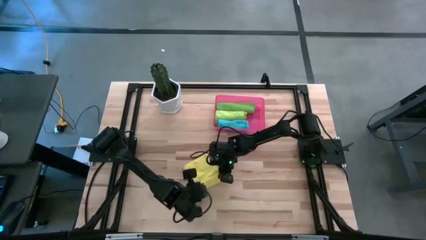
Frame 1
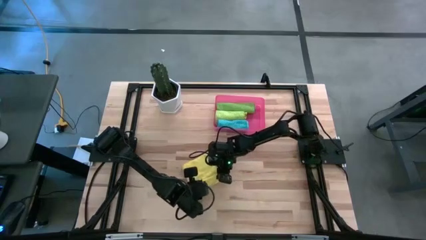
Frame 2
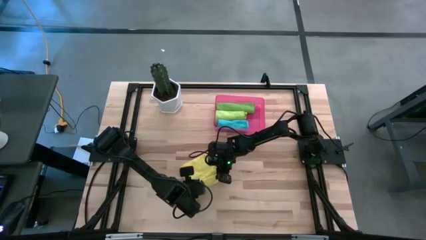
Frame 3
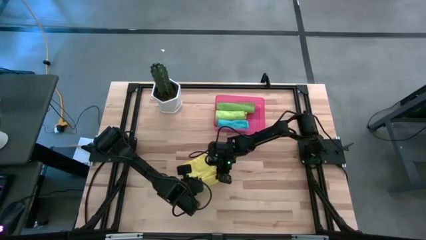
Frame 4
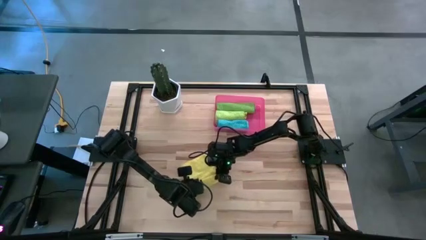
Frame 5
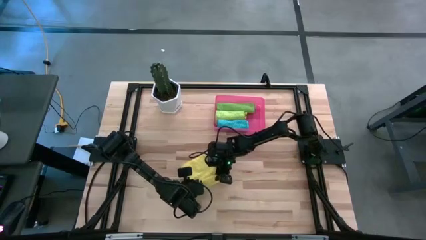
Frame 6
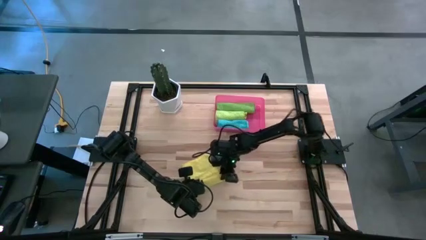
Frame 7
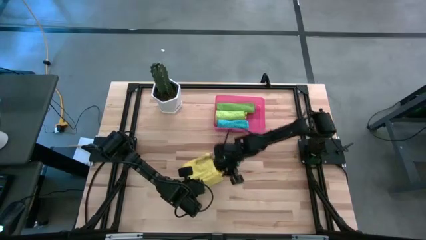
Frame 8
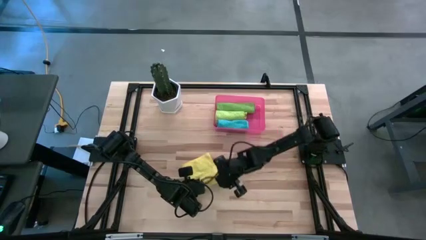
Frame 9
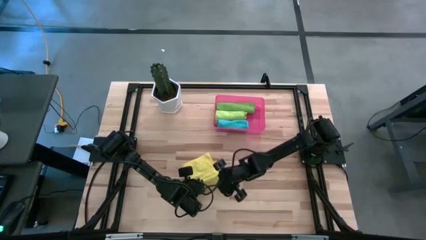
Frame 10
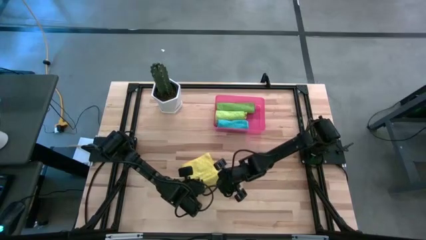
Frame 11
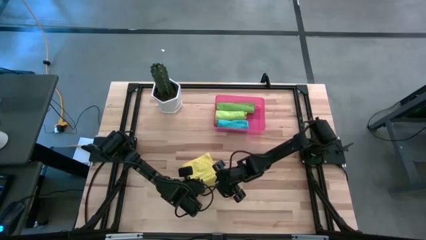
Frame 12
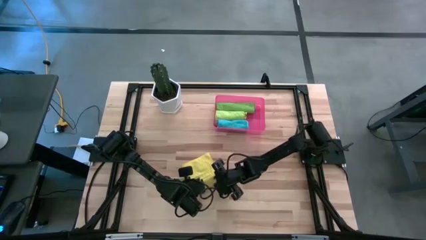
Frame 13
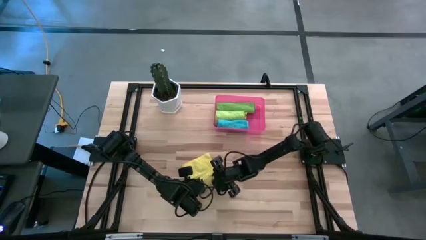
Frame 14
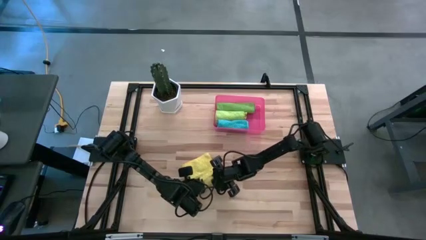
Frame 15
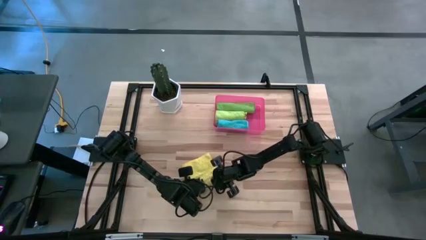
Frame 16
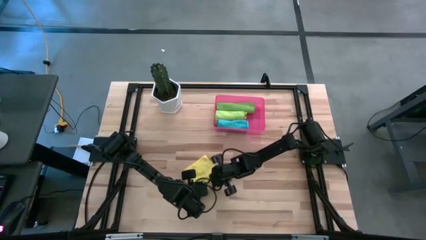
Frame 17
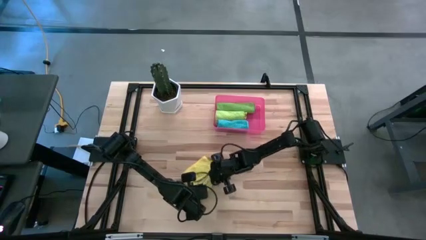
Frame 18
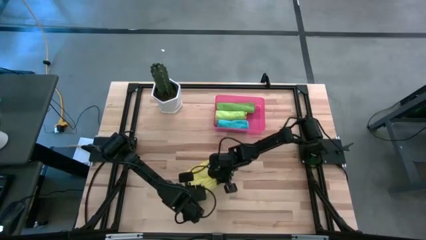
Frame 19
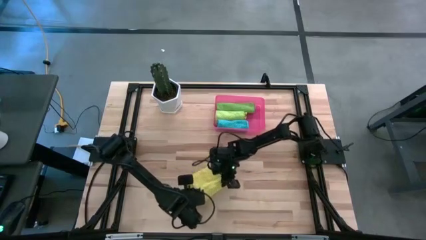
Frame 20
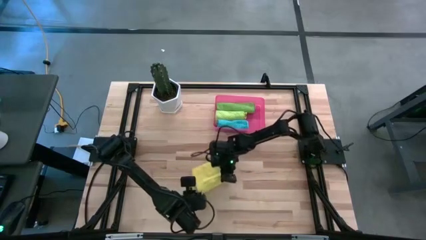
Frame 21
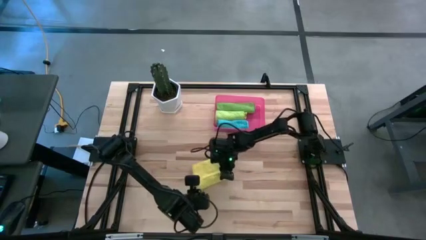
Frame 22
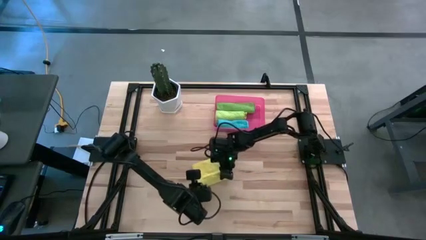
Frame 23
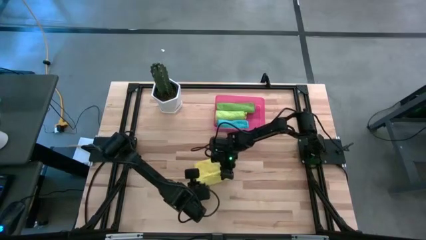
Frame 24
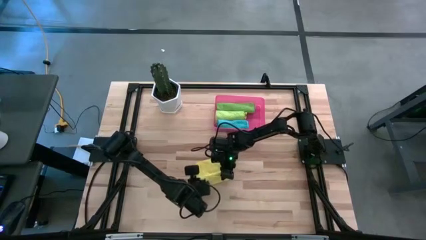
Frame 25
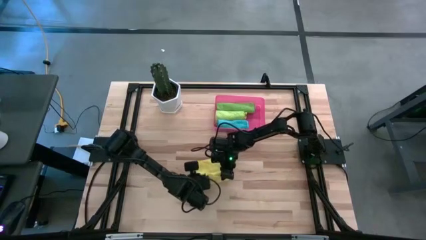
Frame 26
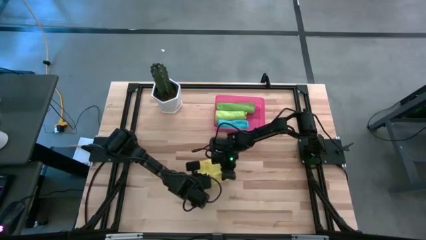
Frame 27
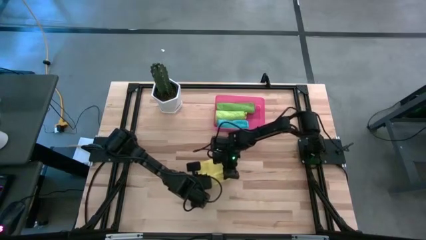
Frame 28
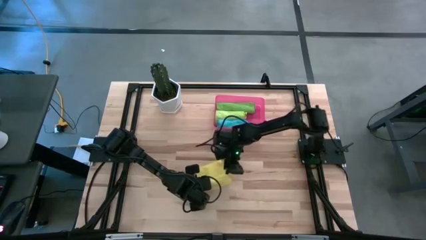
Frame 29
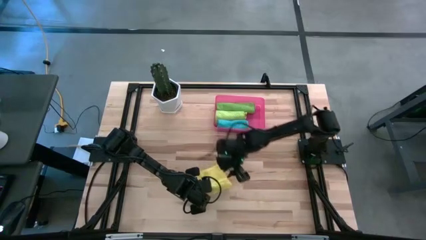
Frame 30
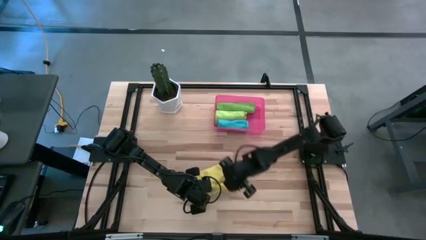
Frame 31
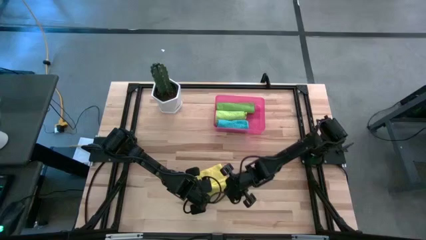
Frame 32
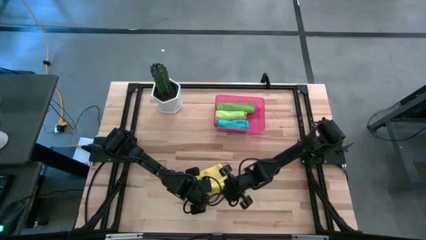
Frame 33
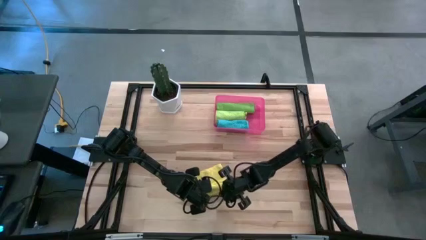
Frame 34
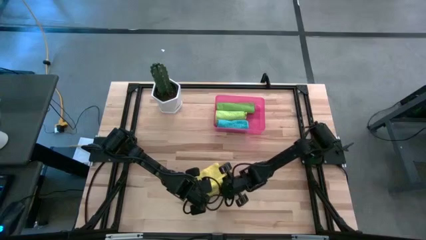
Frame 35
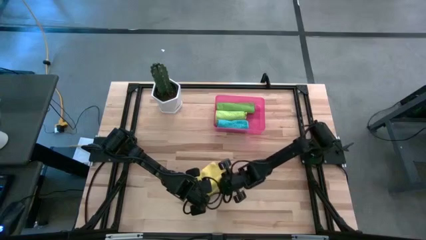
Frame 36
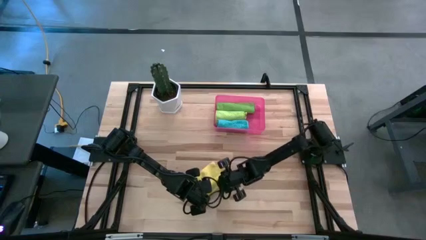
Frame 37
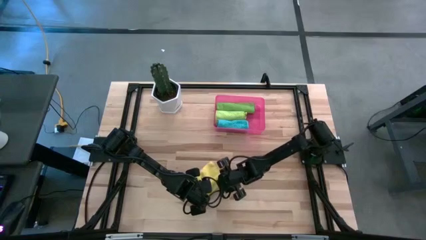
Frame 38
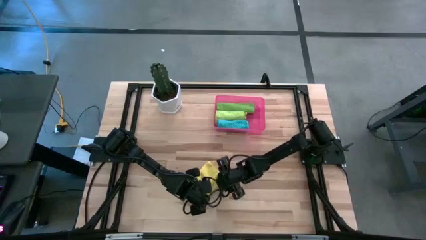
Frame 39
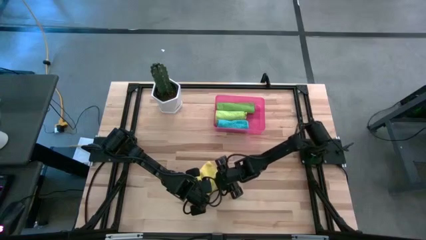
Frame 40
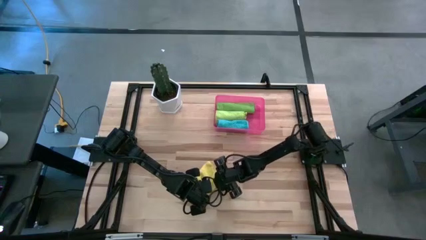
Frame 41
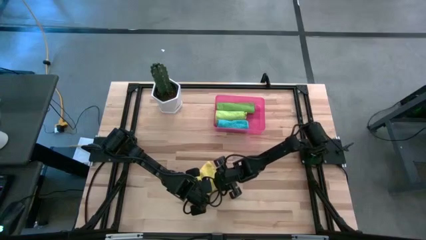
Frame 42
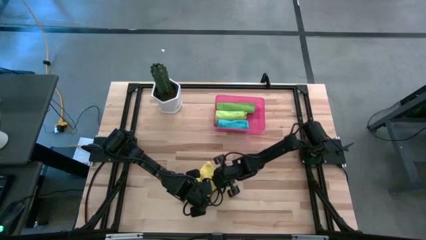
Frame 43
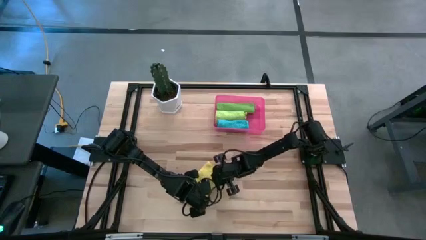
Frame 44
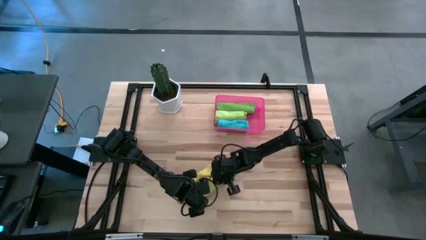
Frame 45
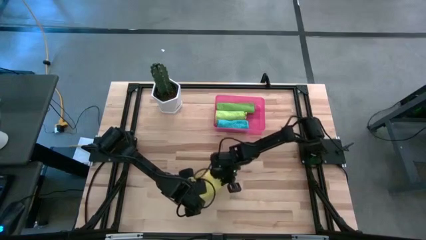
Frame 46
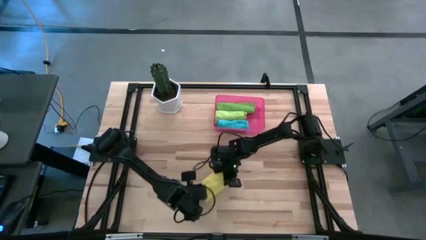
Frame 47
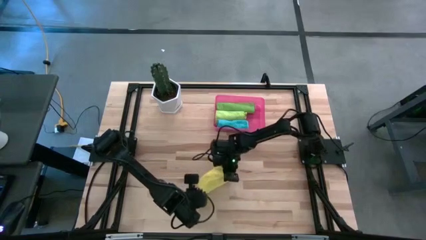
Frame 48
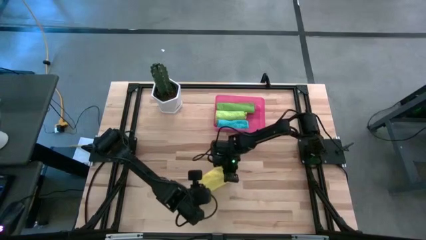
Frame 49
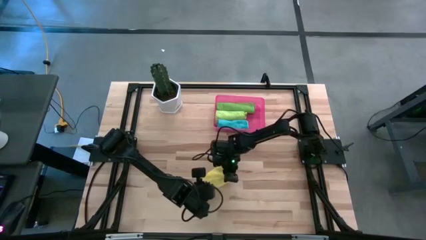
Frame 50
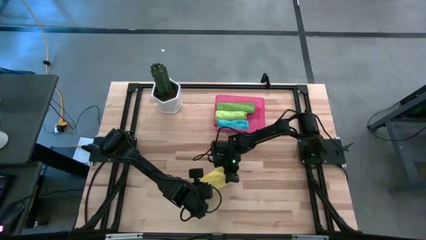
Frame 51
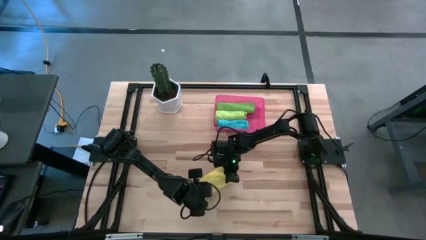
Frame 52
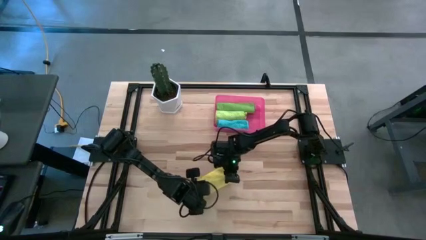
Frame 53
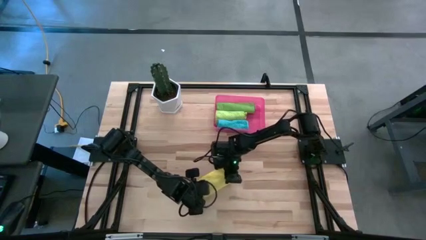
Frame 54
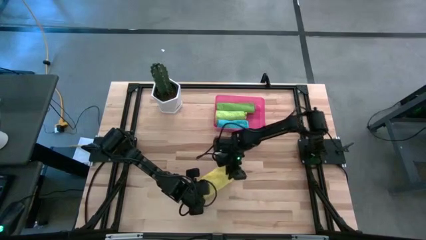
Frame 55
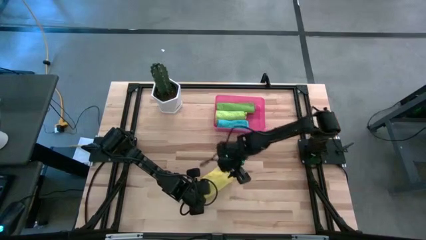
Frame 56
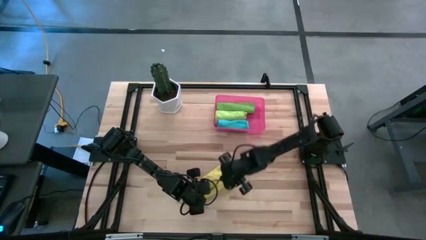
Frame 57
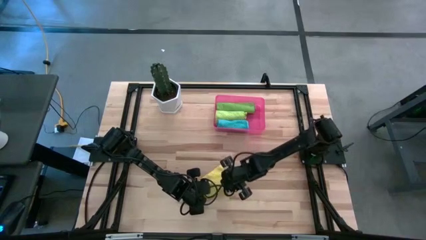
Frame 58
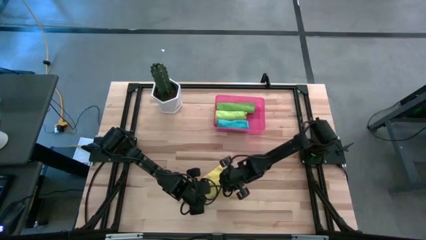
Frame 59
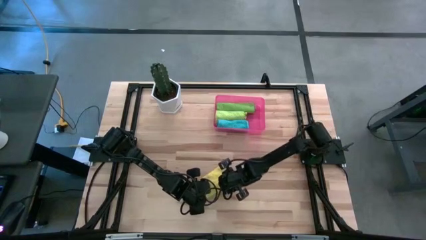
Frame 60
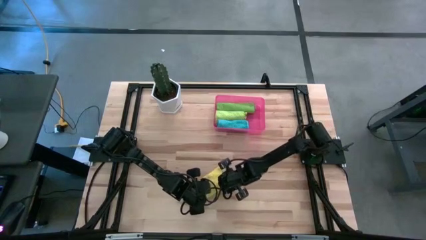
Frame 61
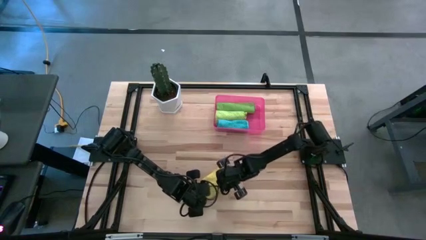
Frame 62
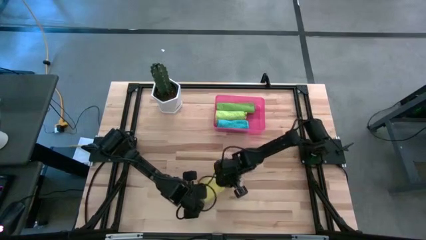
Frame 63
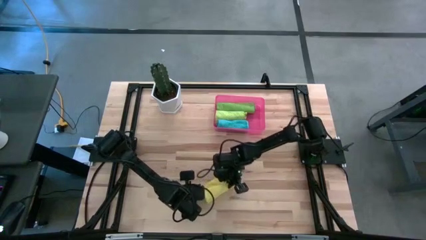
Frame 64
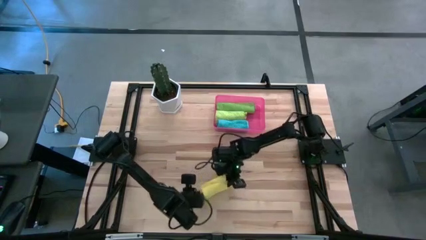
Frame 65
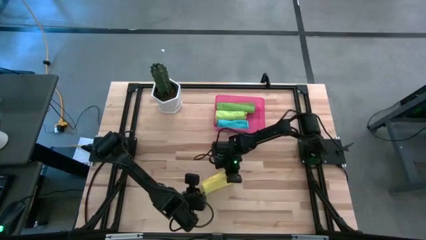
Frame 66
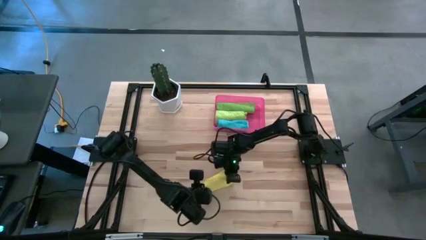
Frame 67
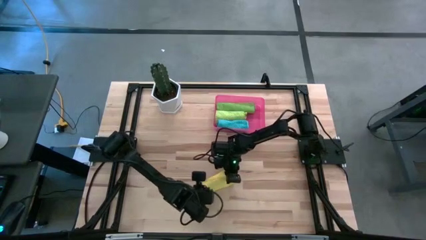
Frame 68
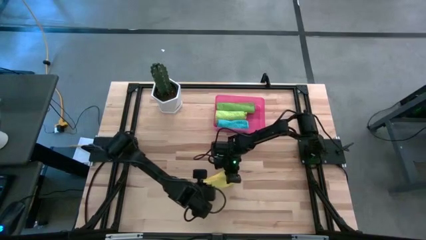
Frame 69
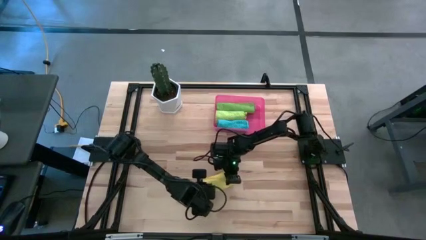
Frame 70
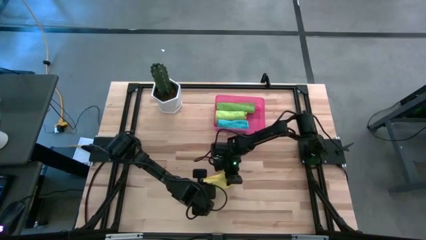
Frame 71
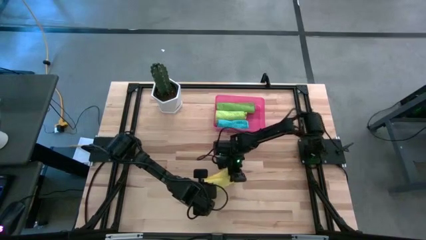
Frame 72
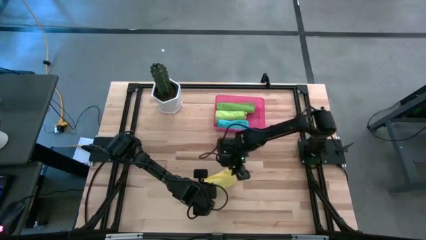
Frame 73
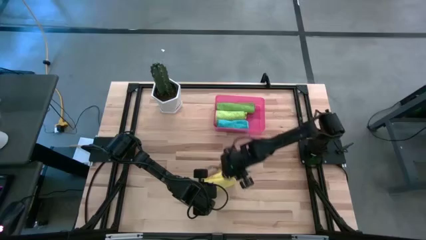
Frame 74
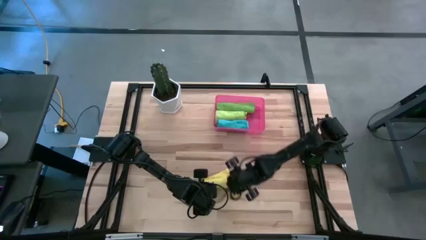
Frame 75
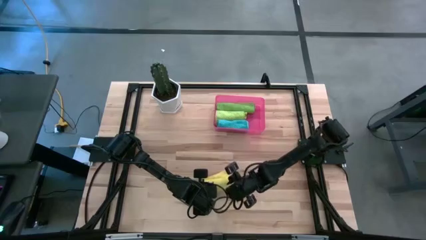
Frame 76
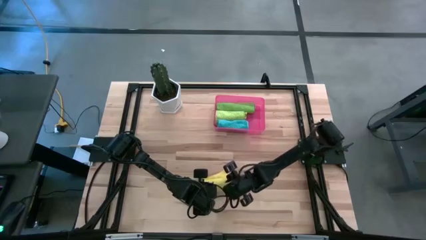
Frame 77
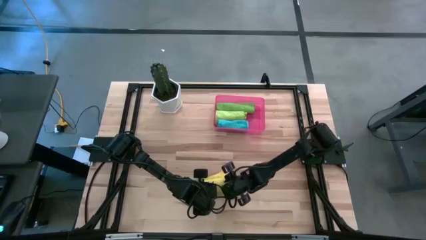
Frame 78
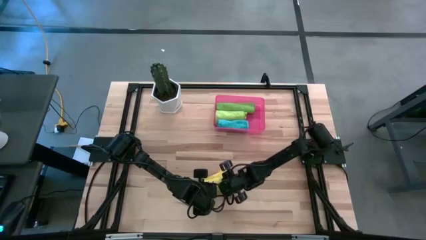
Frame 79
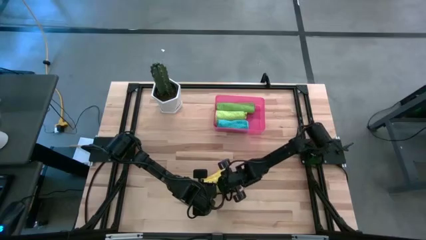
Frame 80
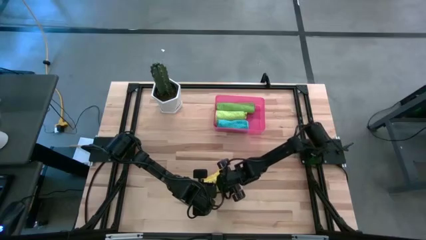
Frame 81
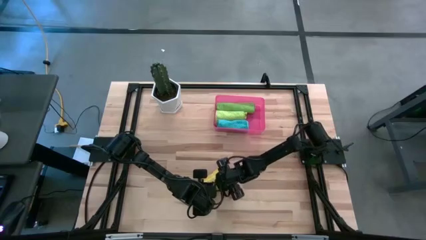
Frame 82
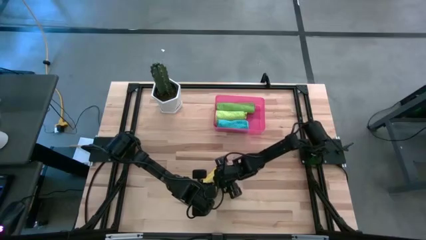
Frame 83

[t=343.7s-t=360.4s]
Task: Roll microfiber towels into tight, uniform cylinder then place into a basket
Roll the yellow microfiber cloth
